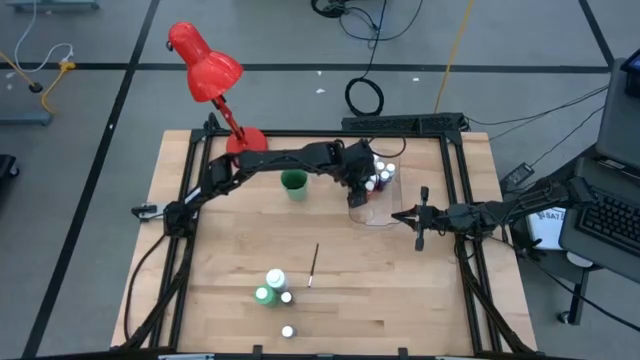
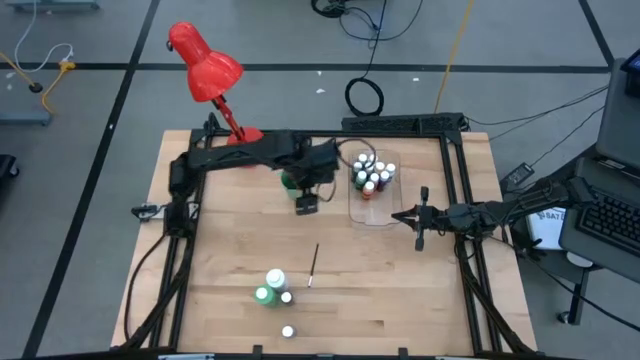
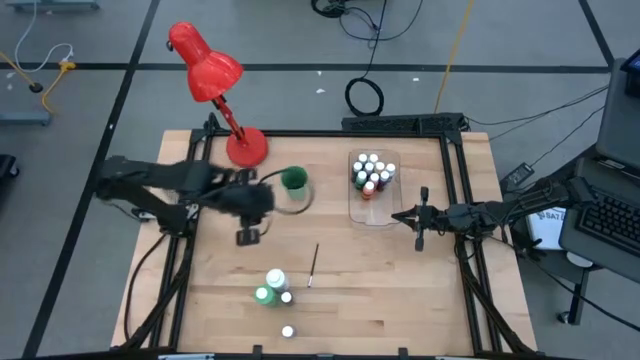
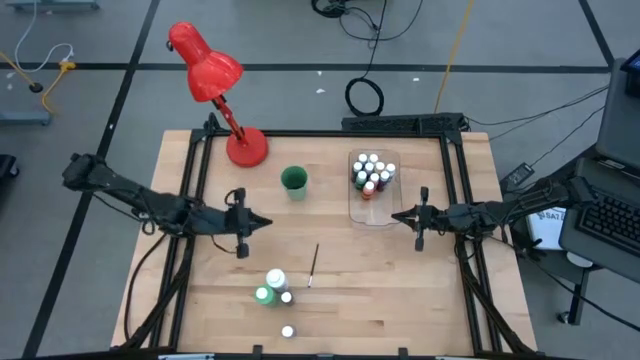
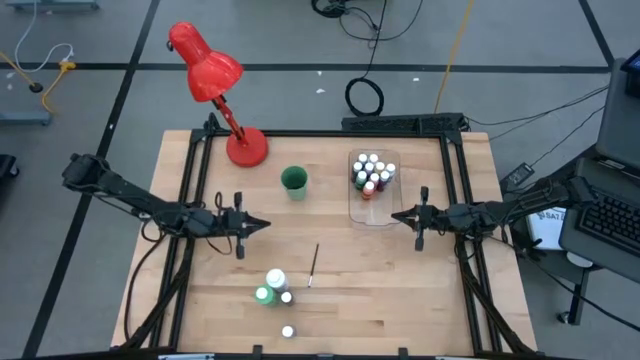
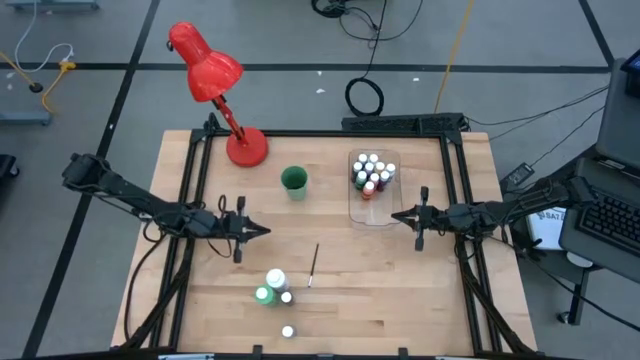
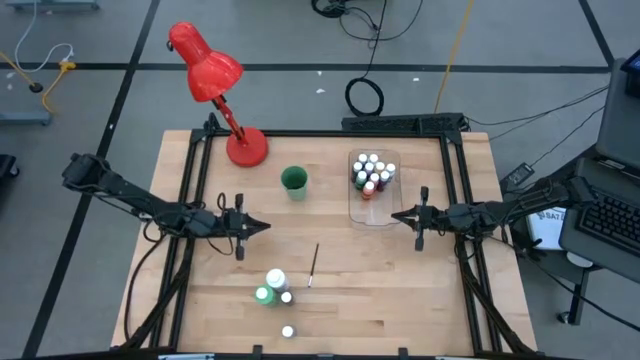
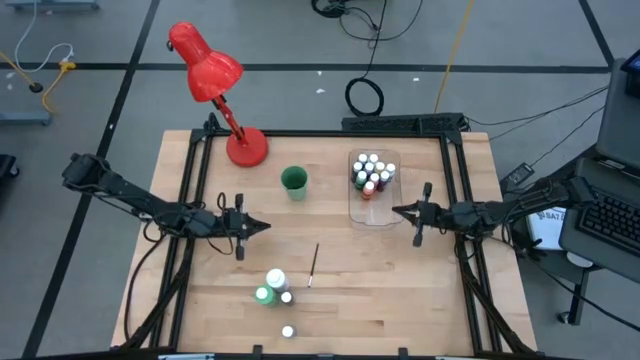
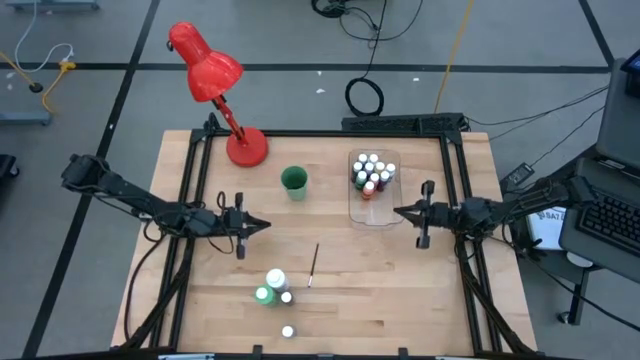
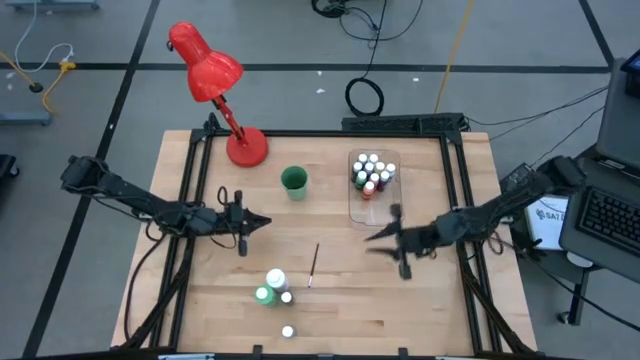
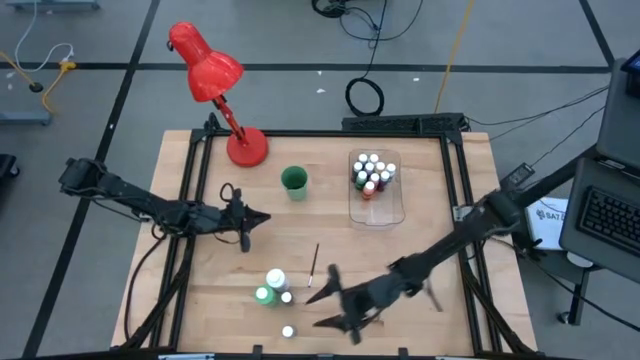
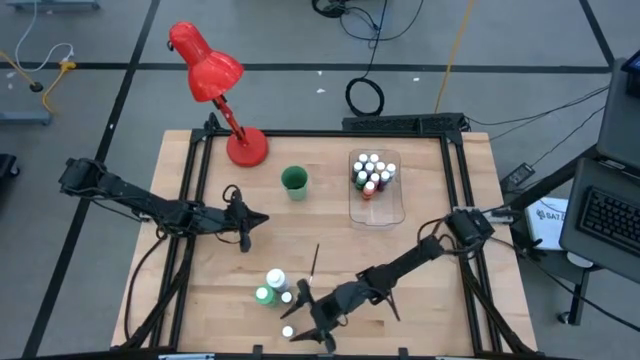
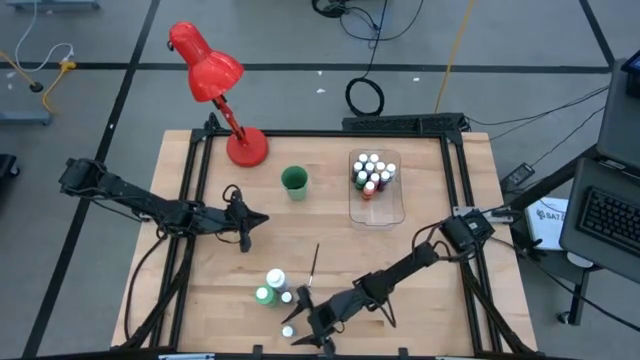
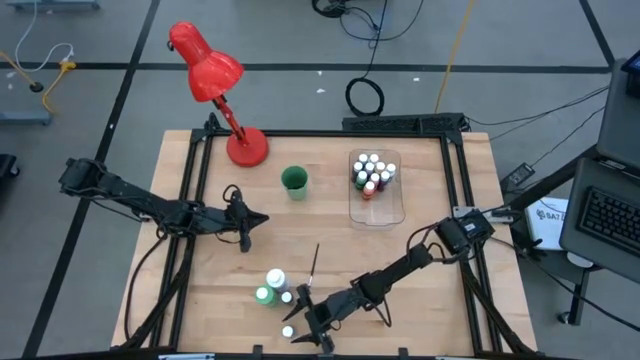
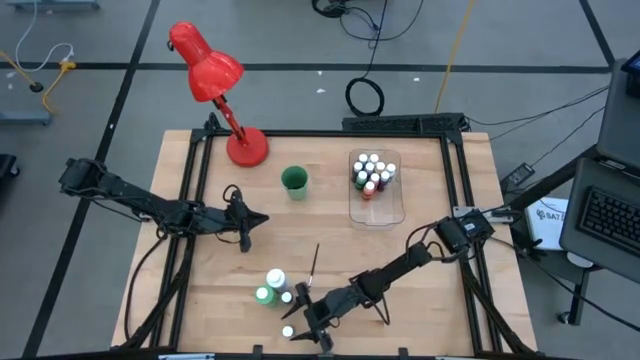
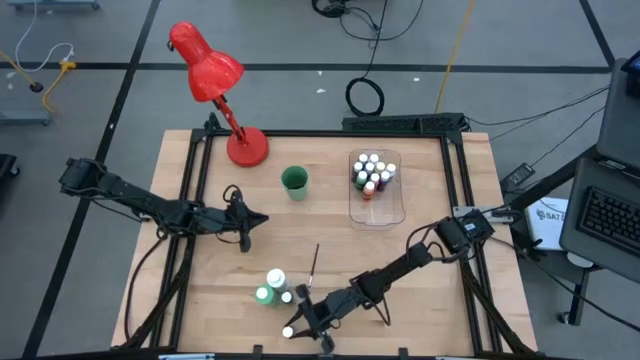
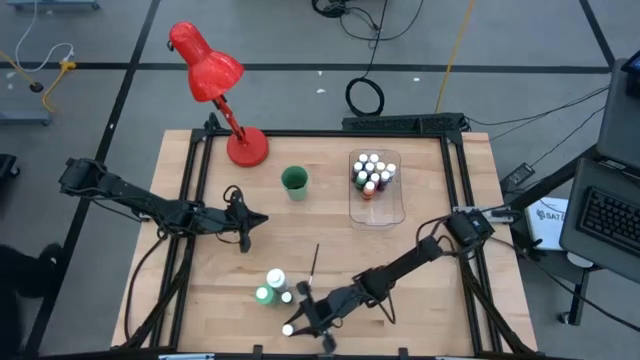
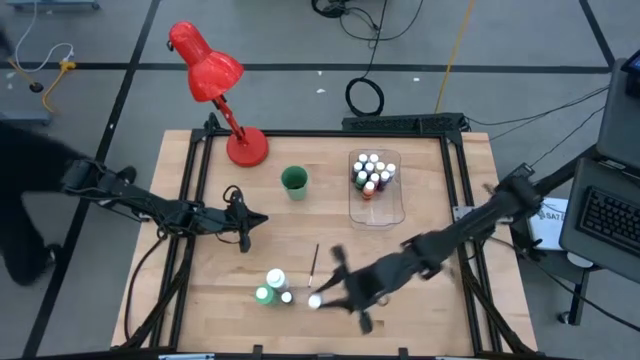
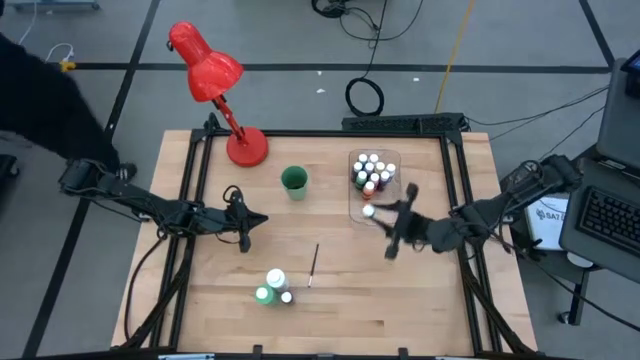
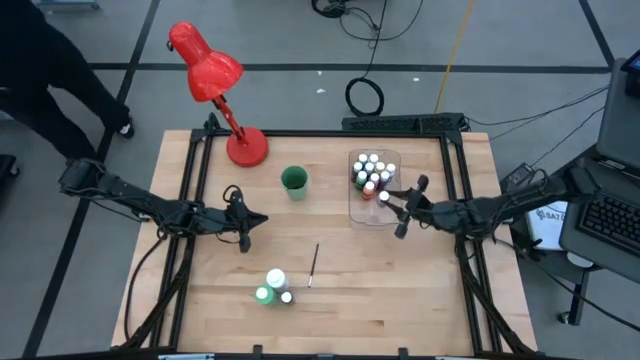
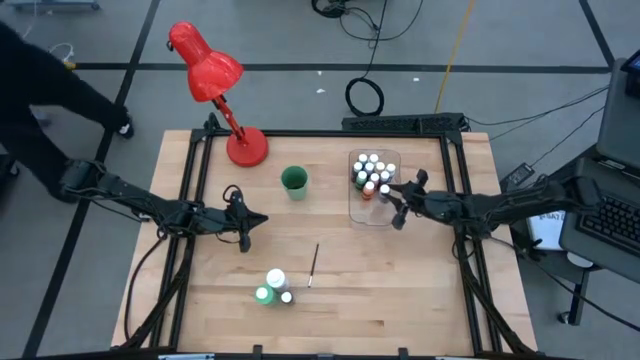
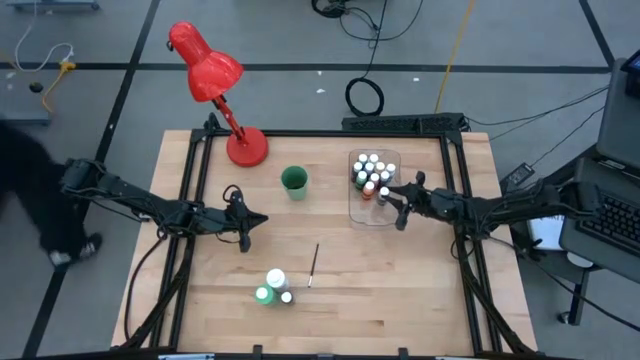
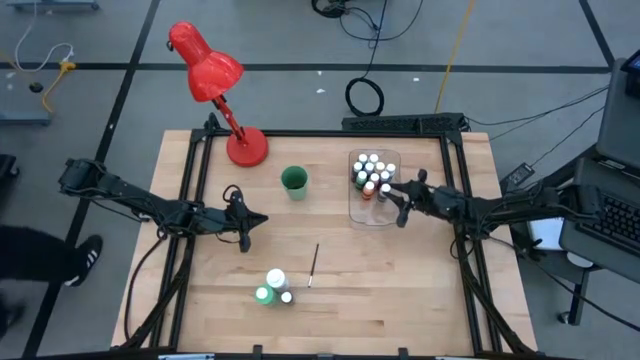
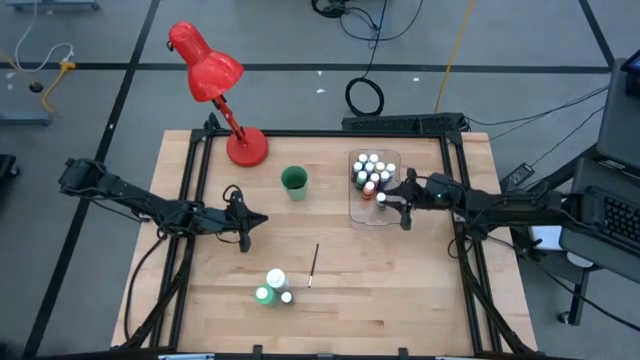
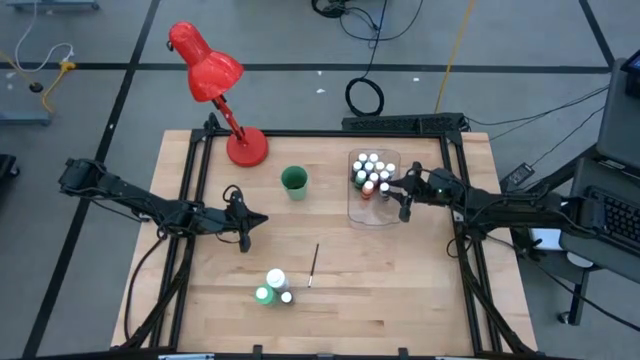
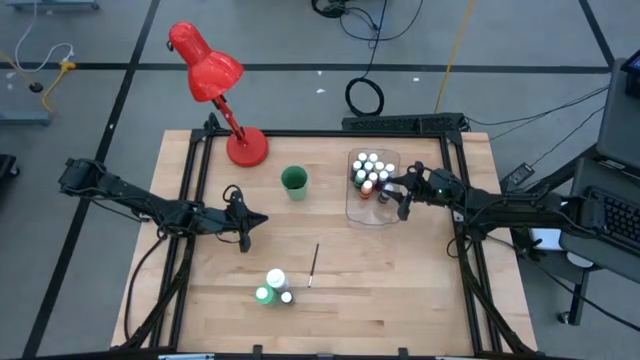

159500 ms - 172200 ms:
Task: Pick & Place Paint Supplies
Put the gray paint bottle into the transparent bin

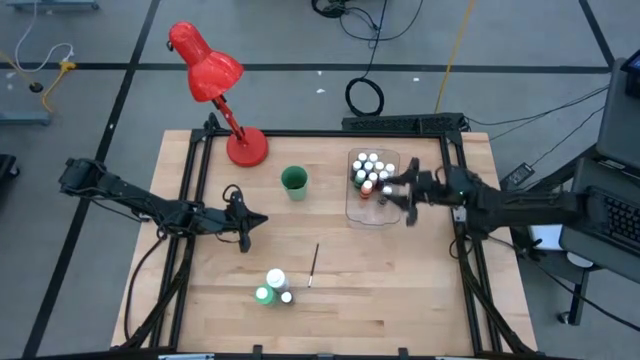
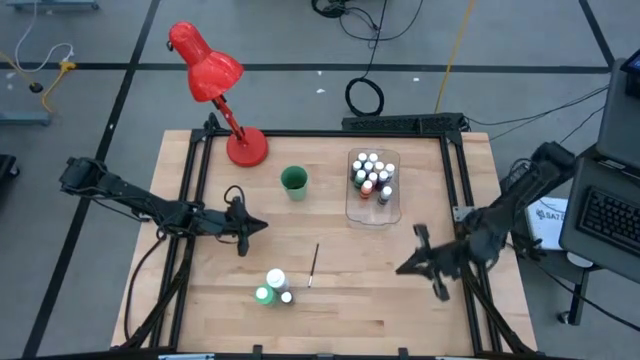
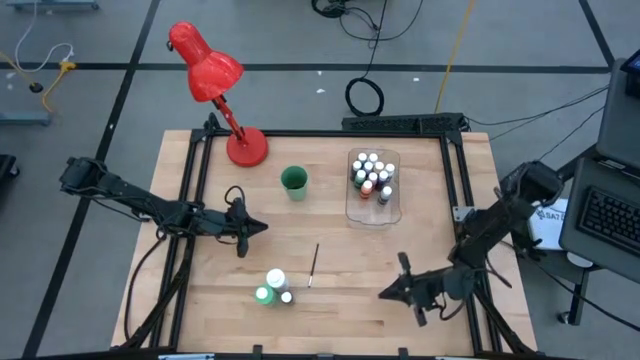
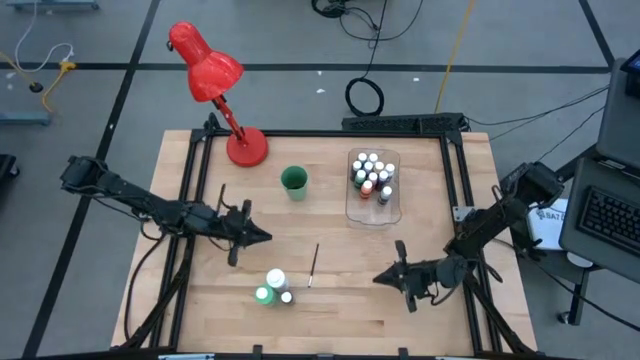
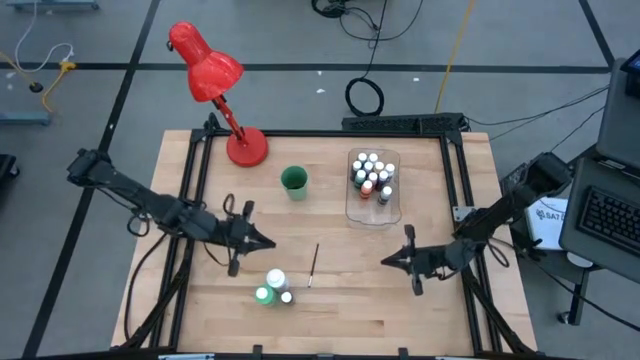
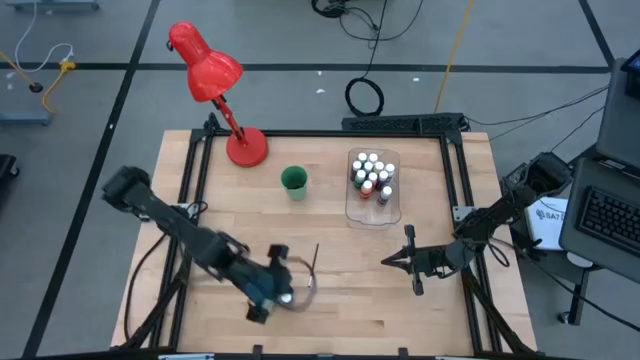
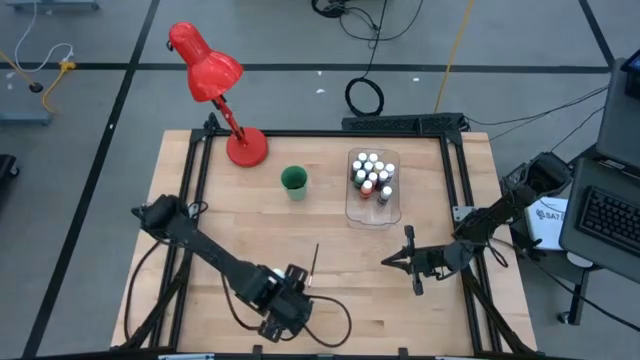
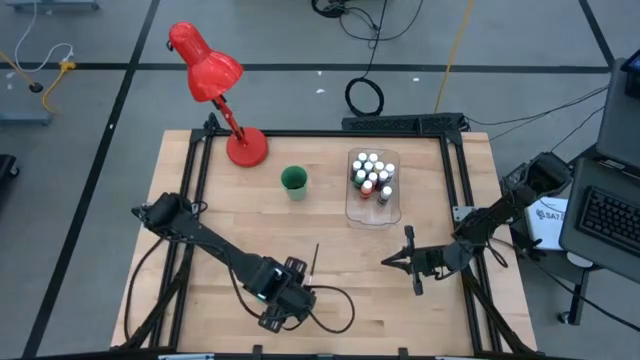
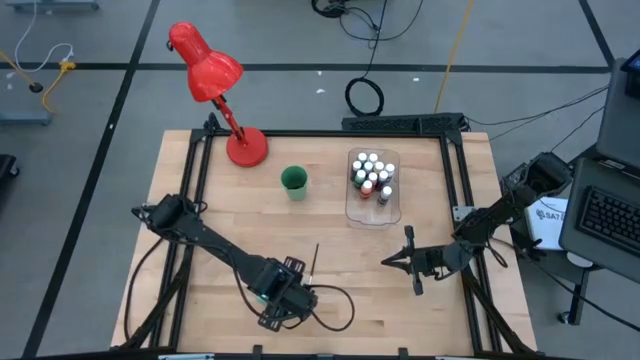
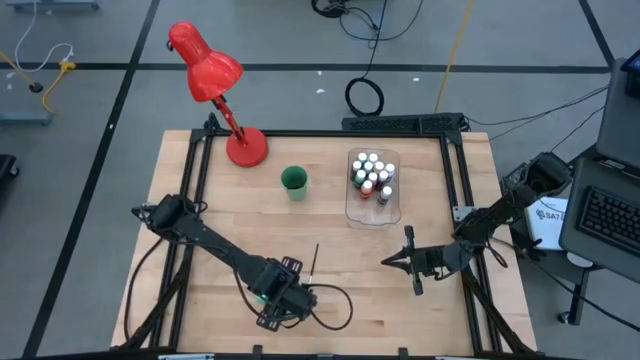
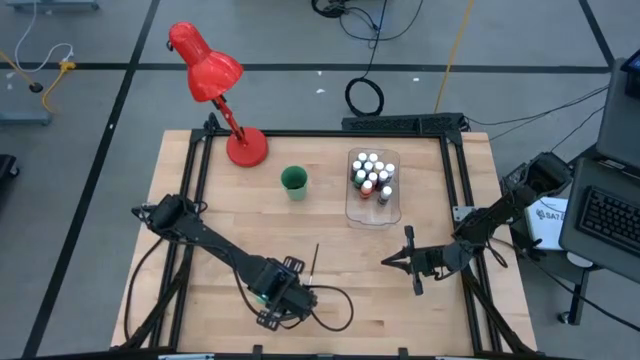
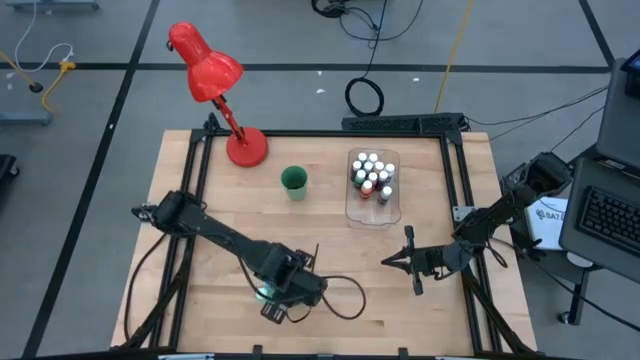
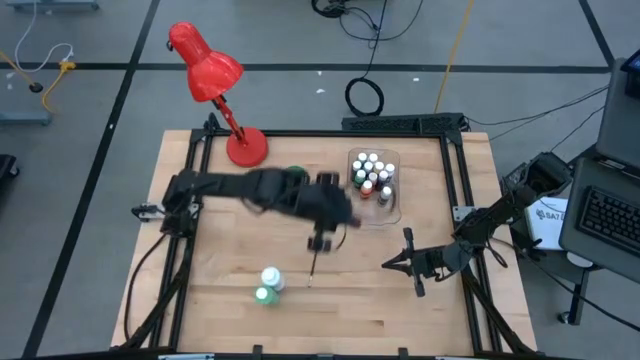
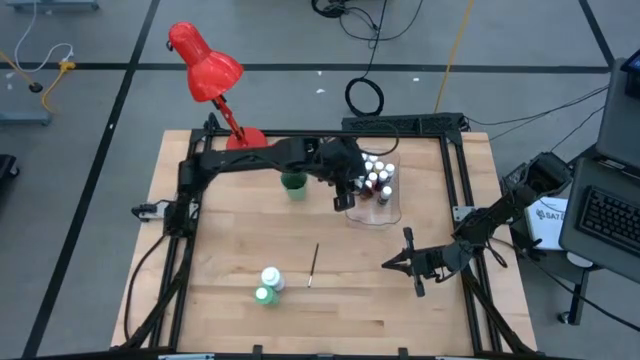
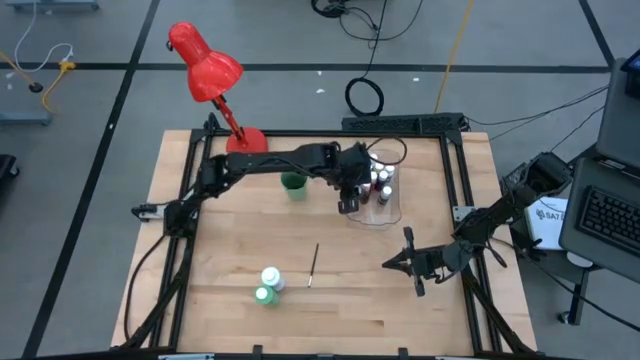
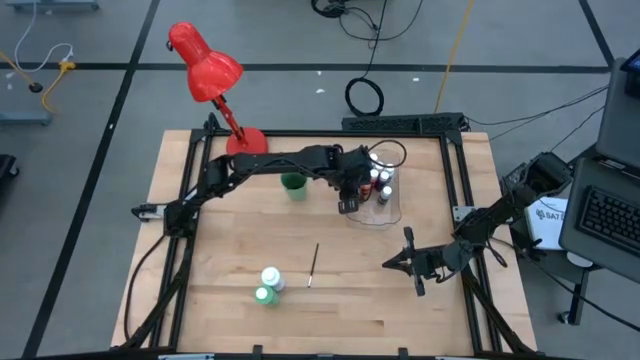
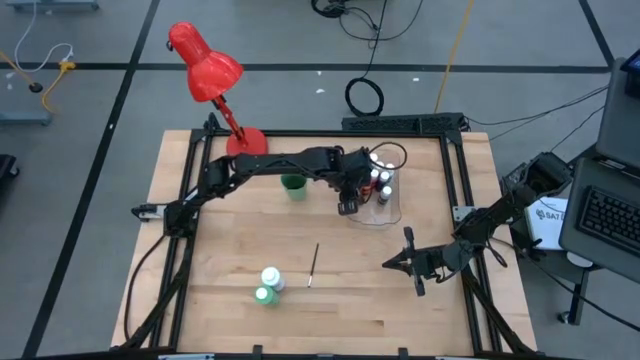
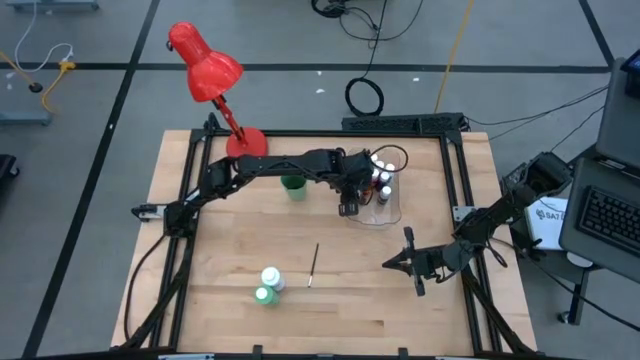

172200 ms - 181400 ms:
Put the brown paint bottle into the transparent bin
